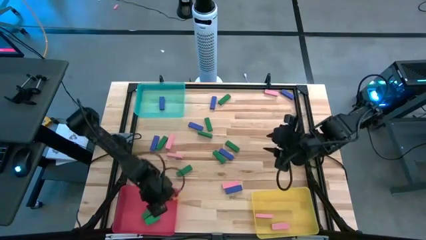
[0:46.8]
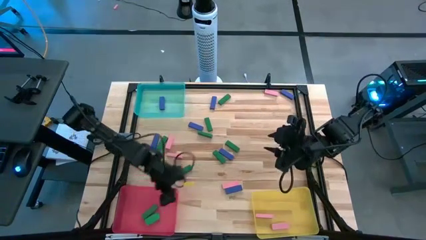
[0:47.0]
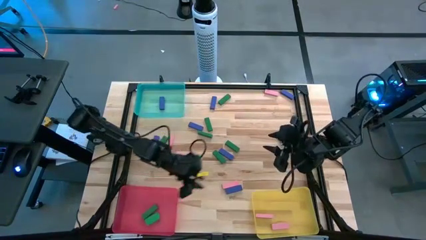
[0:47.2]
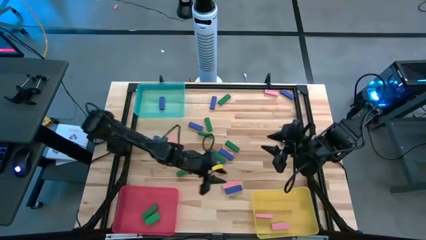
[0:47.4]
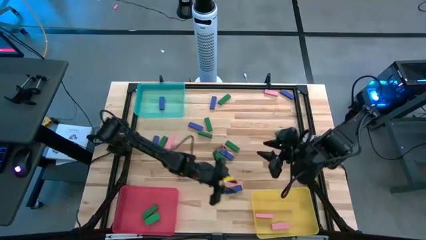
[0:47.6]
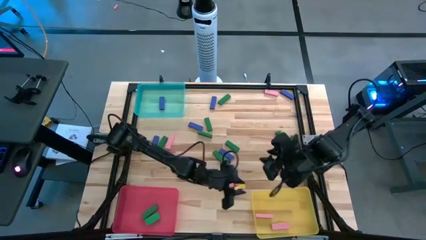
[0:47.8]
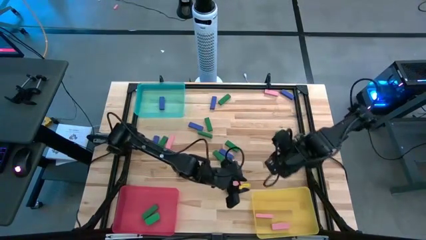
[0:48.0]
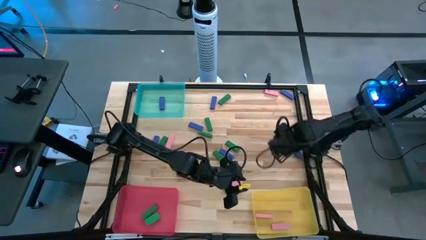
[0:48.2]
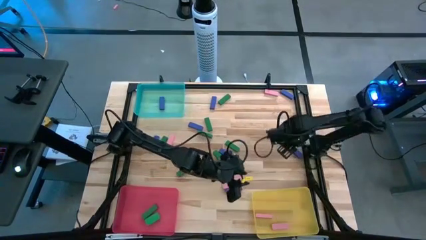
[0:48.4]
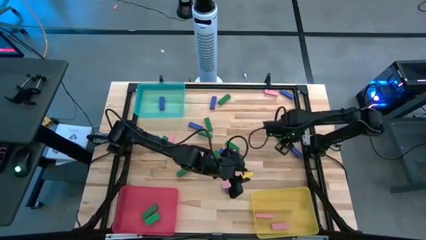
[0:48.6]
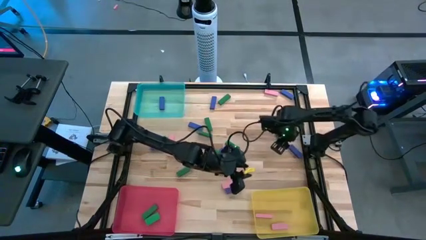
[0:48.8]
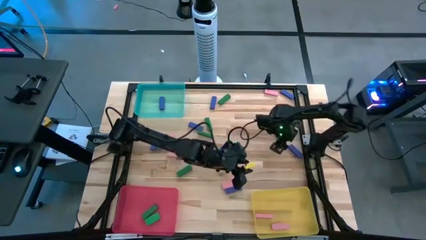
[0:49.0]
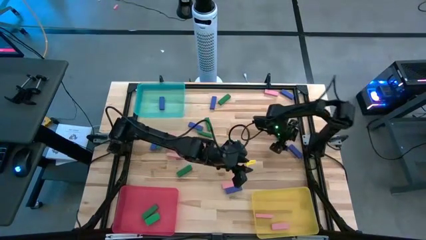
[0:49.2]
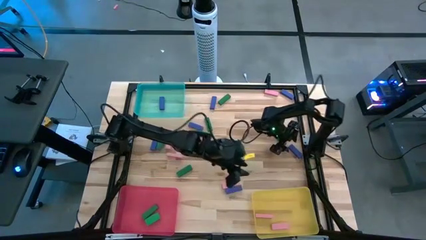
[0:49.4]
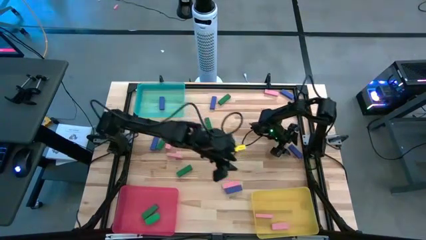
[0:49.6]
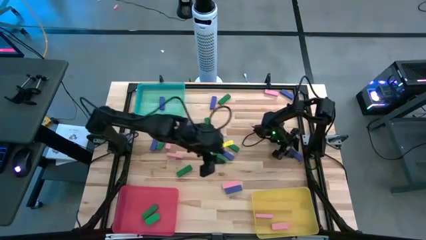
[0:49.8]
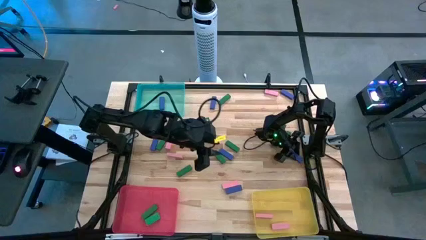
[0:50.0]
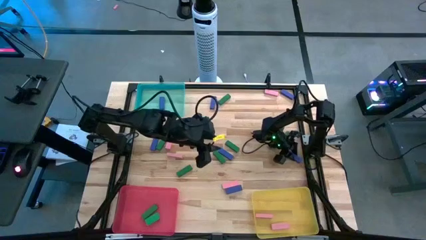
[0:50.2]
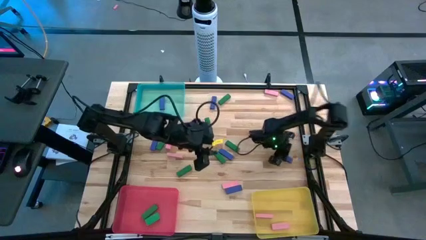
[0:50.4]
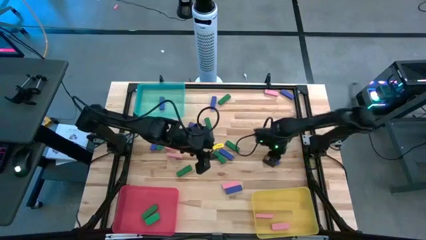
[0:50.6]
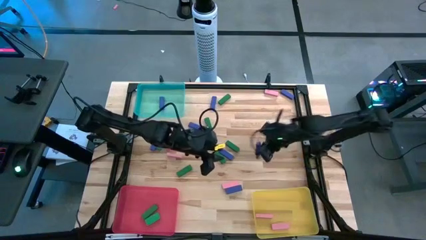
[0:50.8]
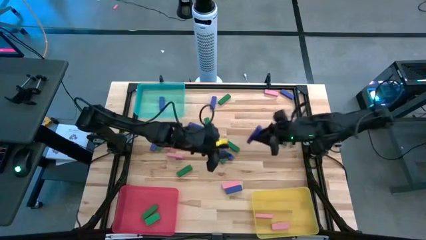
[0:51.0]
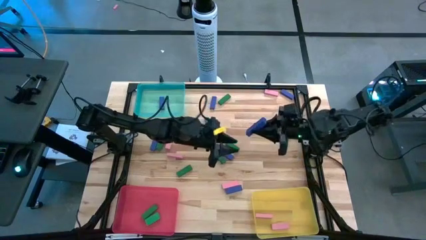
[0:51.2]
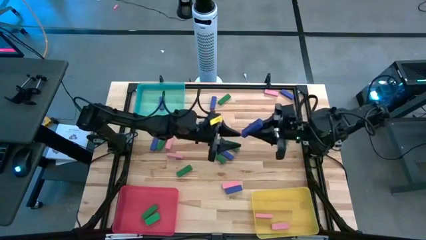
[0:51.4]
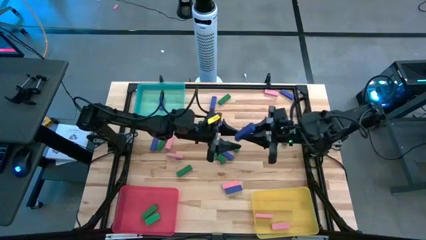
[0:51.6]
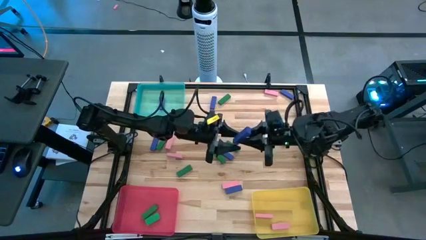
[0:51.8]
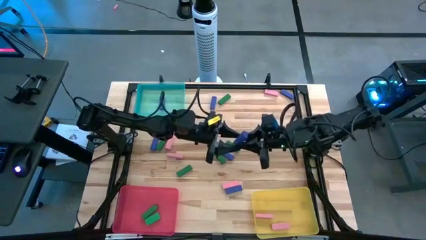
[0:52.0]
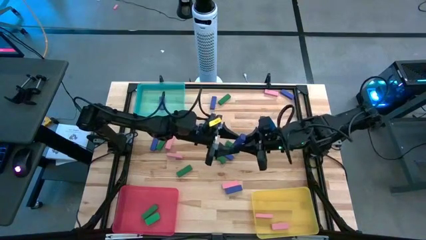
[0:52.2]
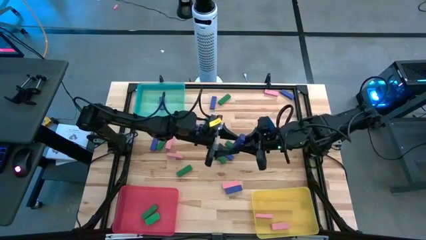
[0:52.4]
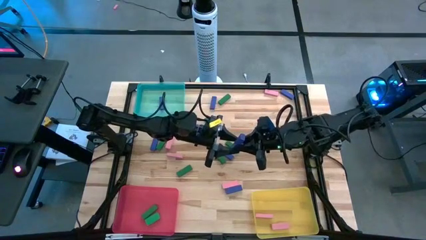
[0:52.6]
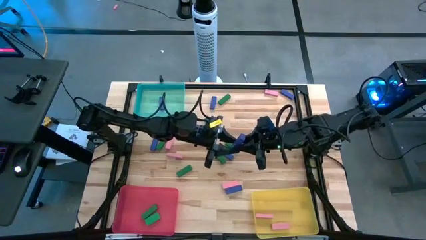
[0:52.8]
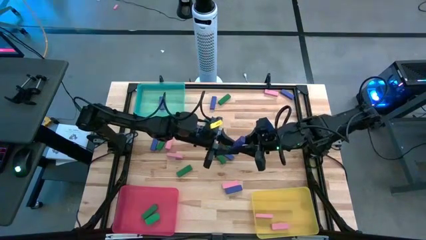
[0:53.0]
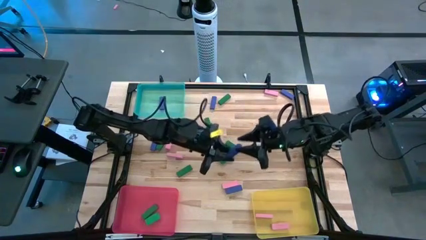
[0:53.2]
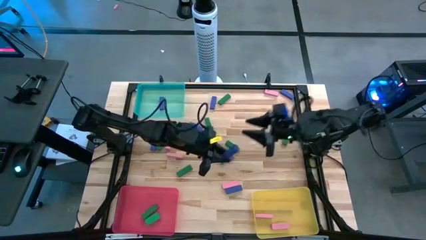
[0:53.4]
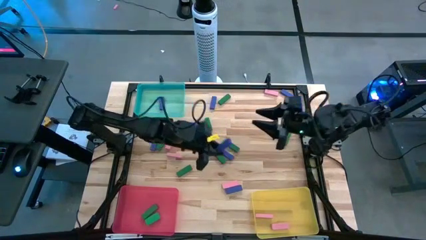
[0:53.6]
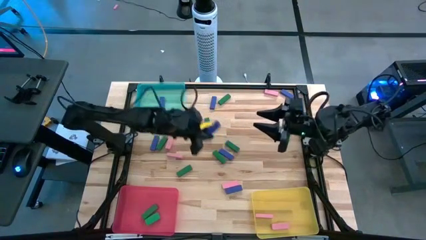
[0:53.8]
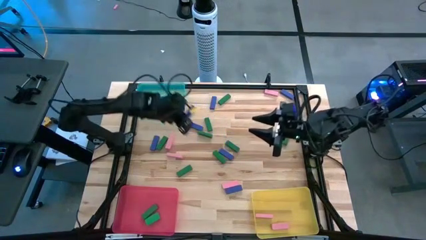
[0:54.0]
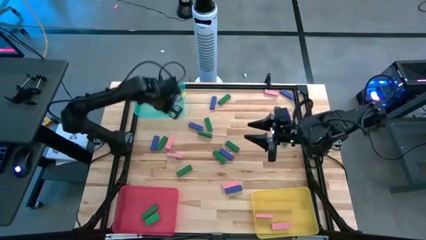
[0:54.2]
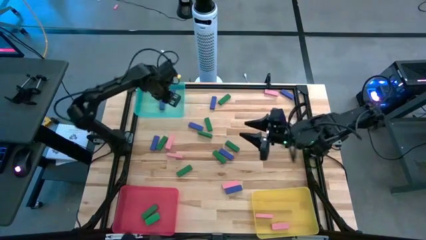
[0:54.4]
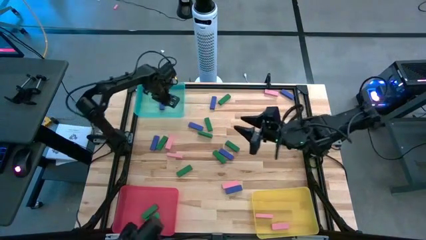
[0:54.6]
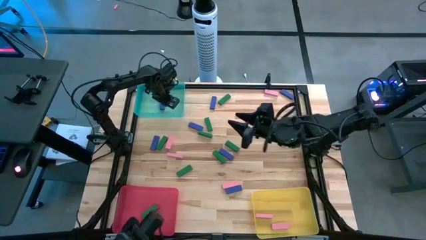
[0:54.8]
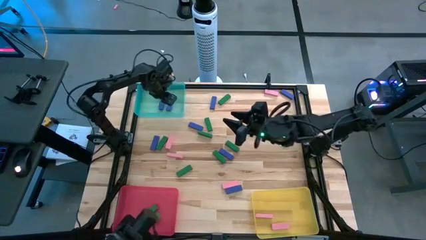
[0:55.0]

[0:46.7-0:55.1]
Task: Sort blocks
Put the blue block into the blue bin

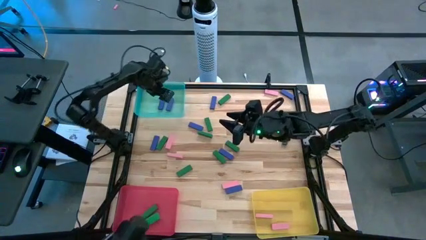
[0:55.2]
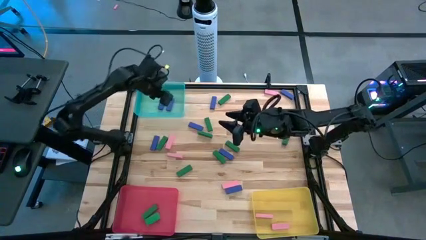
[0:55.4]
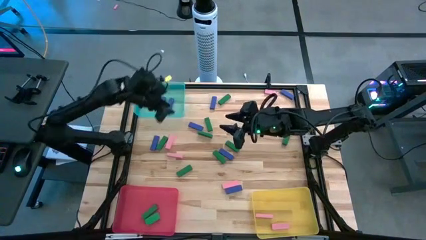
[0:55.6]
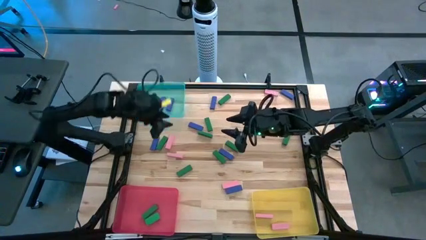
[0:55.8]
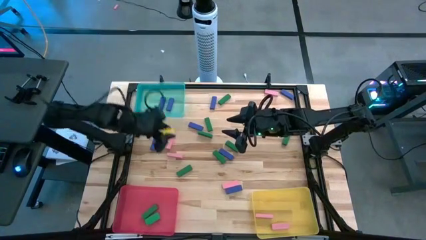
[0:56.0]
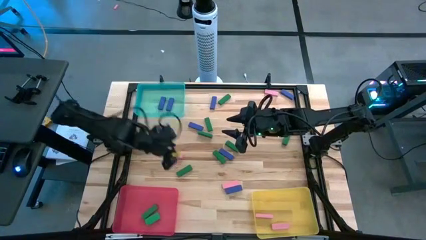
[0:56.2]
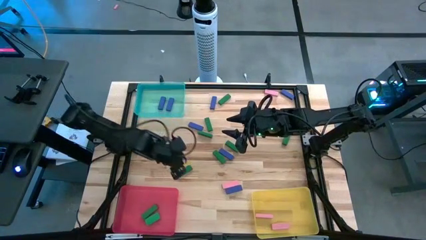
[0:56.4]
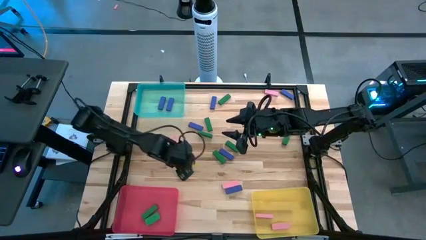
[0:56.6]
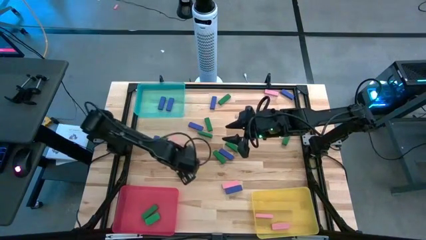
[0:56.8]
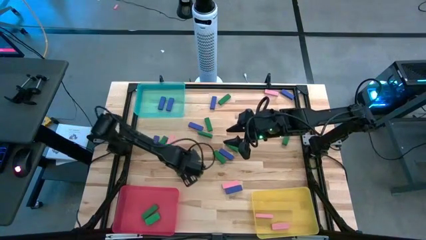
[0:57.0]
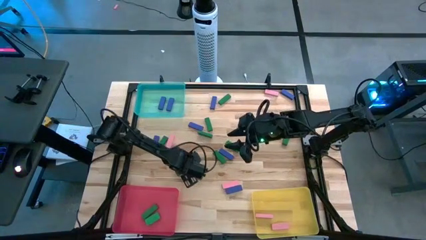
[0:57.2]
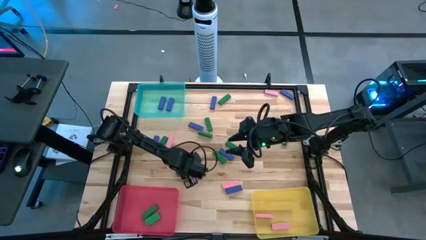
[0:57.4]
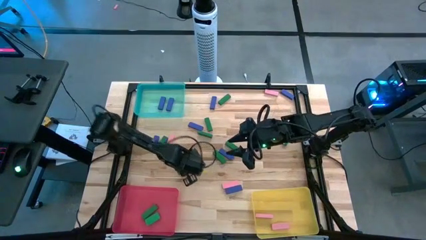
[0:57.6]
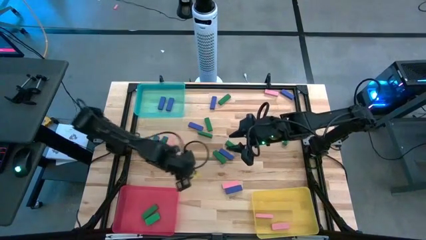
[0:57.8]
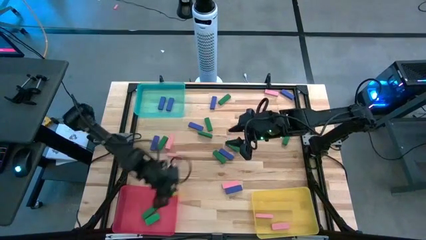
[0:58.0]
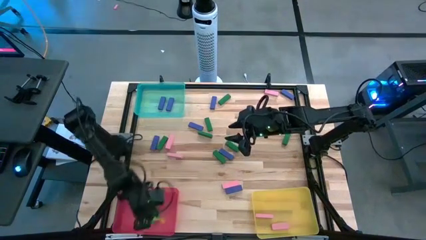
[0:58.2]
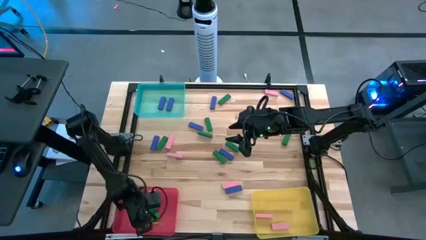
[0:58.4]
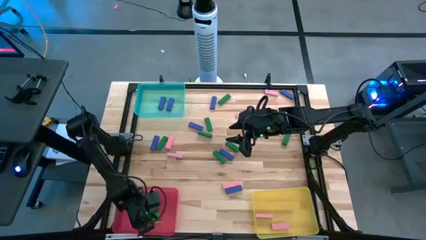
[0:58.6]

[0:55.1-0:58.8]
Put the green block into the red bin

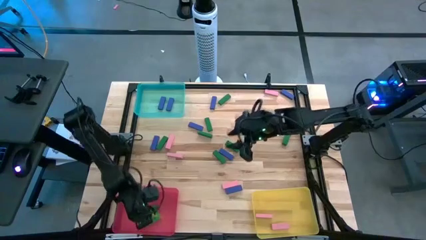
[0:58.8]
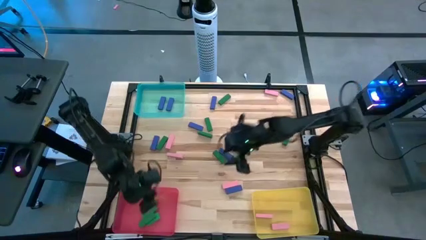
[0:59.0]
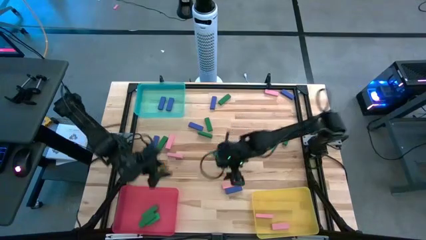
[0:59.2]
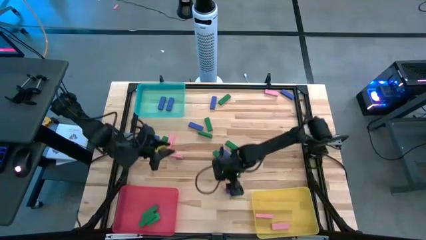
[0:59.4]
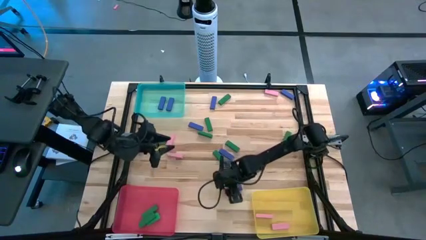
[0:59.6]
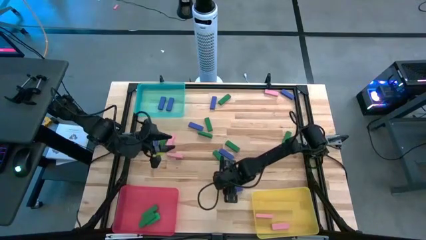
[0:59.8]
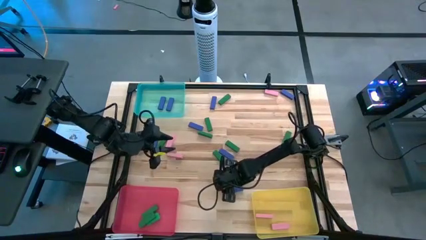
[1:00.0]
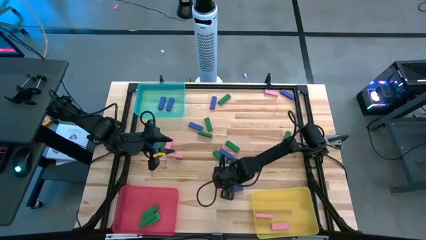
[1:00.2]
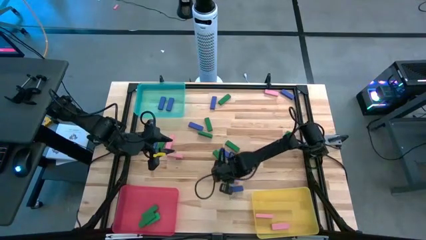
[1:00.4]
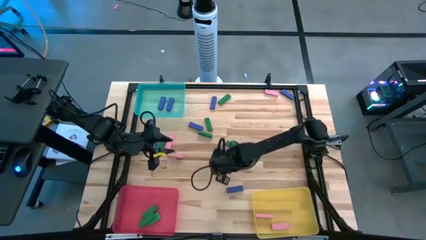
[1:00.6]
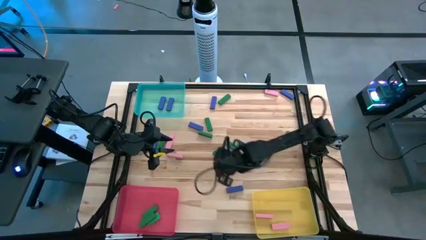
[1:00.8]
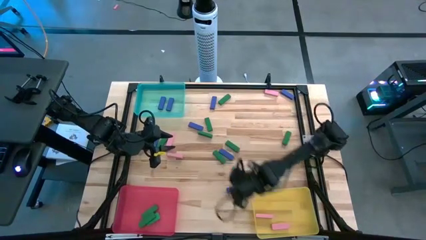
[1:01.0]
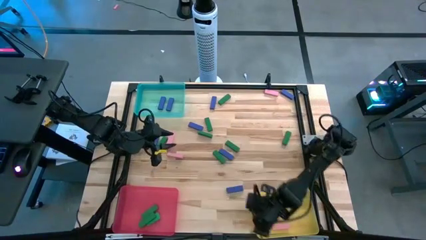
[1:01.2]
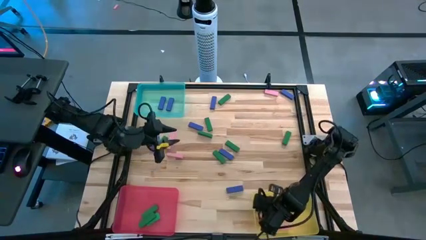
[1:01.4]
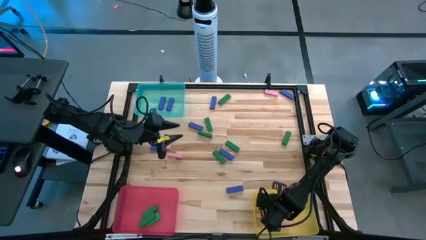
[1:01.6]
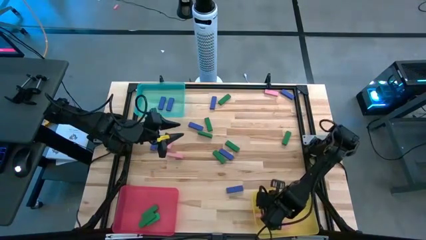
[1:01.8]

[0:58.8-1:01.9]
Put the pink block into the yellow bin

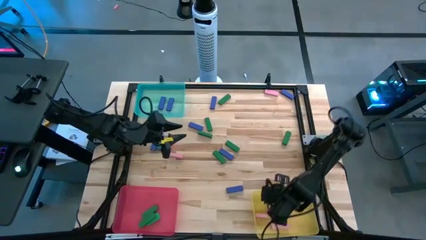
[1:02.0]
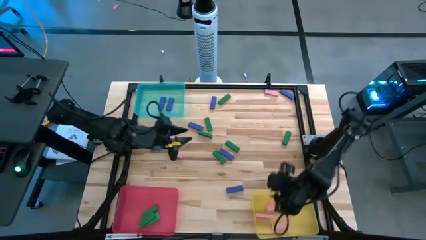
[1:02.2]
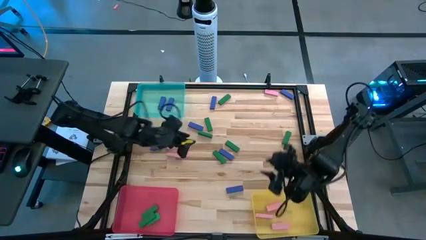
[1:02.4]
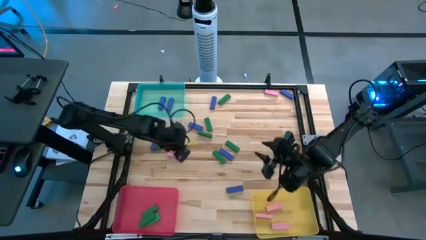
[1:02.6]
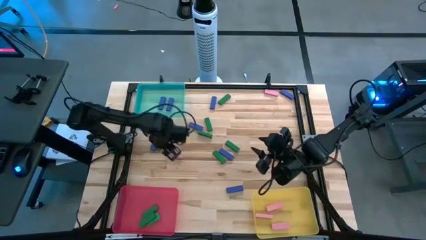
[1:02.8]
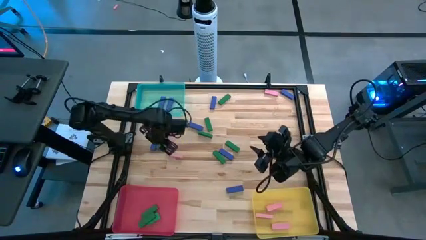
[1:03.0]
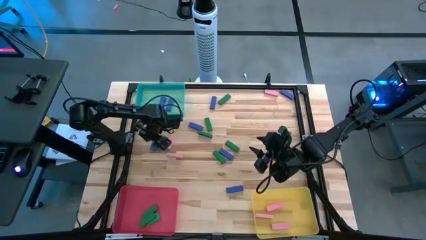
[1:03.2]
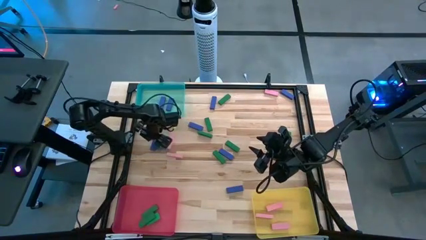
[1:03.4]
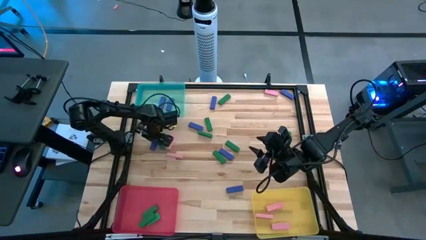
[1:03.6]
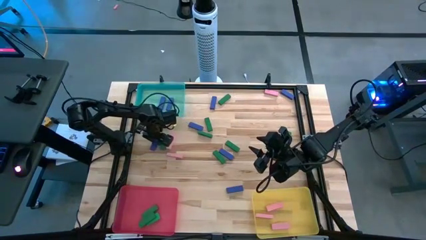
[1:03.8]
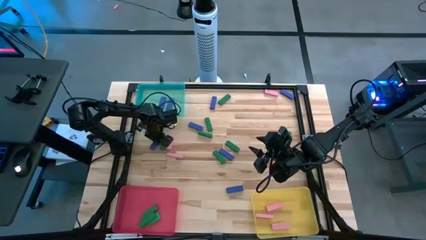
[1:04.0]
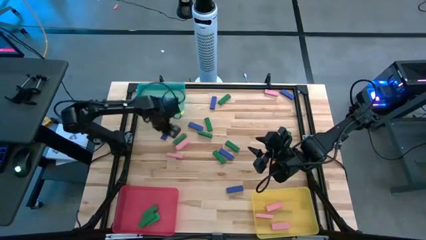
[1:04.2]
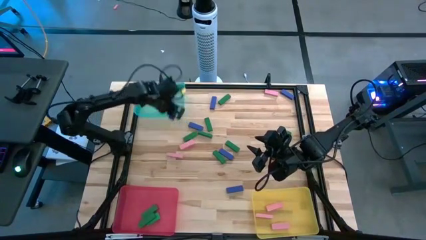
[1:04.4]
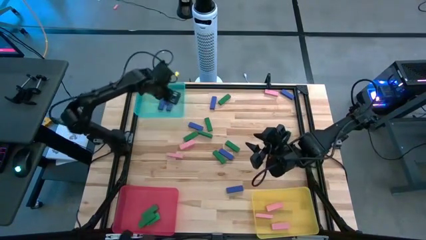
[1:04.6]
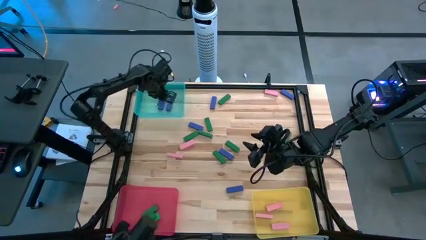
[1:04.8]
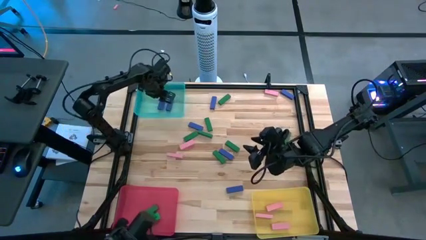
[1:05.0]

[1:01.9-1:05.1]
Put the blue block into the blue bin
